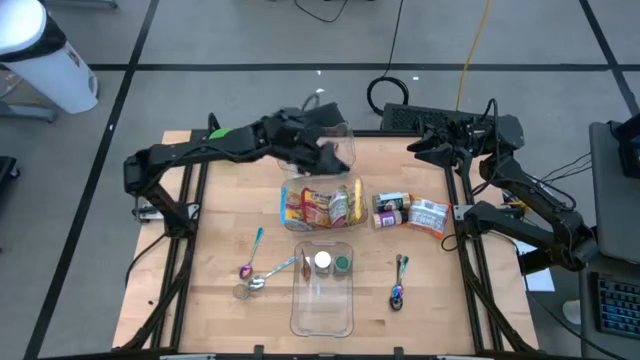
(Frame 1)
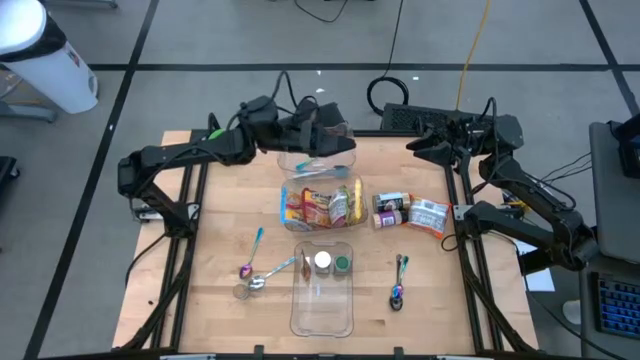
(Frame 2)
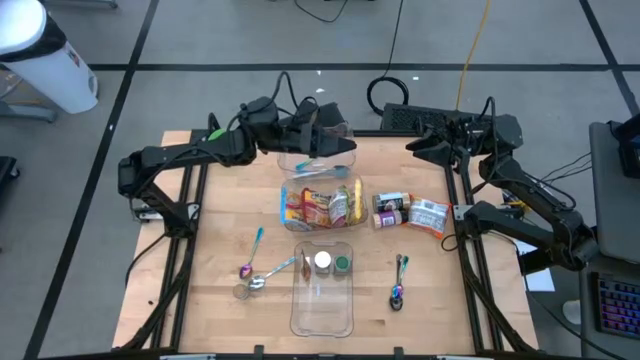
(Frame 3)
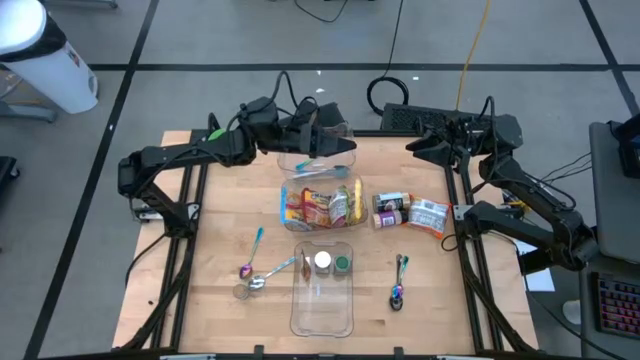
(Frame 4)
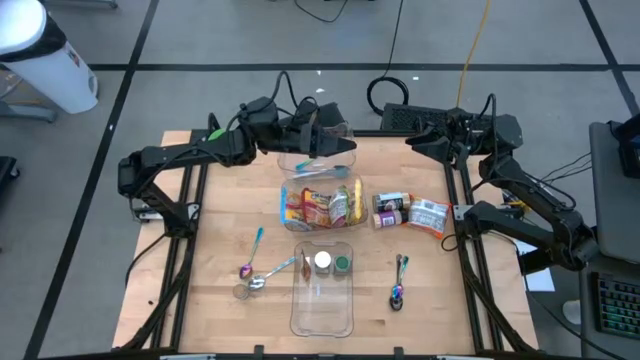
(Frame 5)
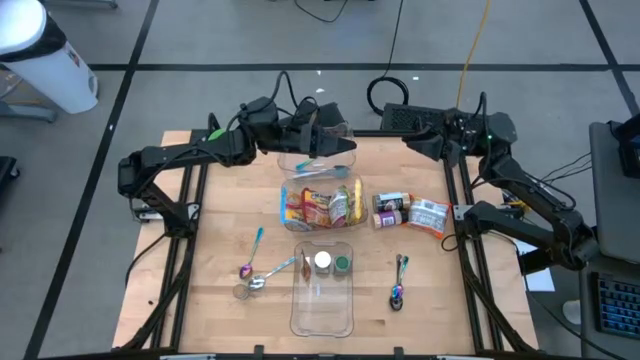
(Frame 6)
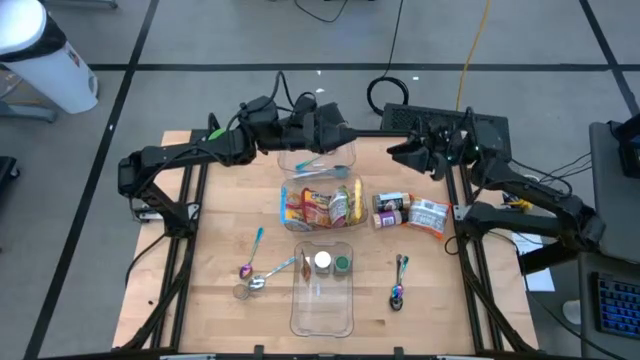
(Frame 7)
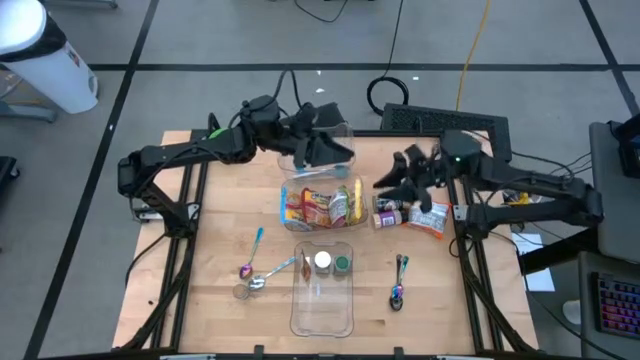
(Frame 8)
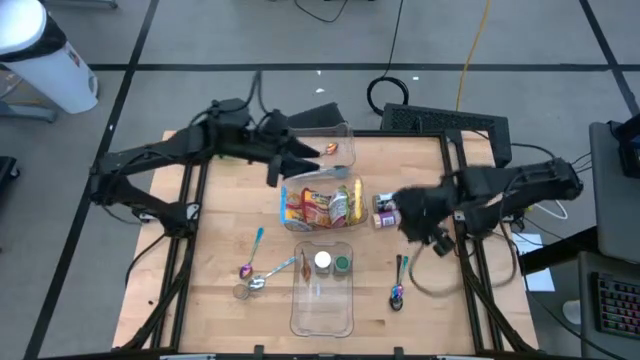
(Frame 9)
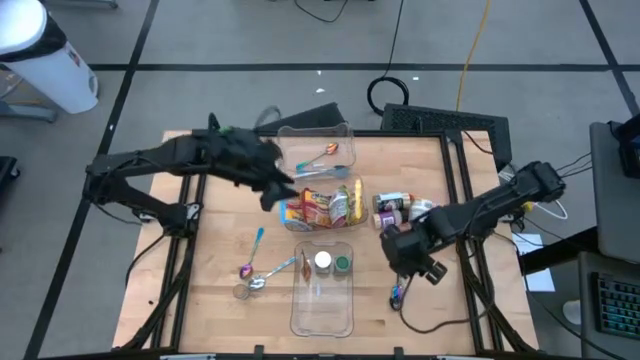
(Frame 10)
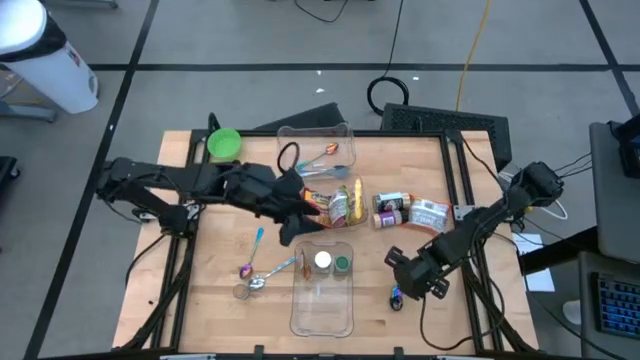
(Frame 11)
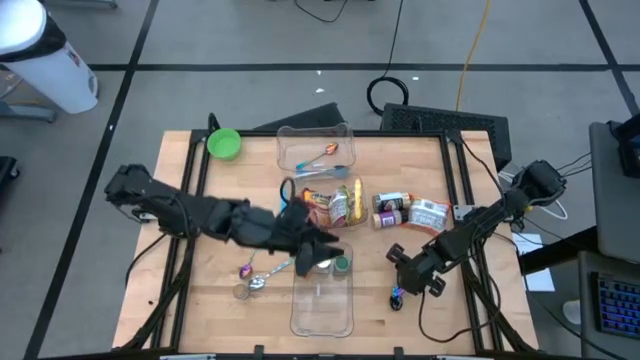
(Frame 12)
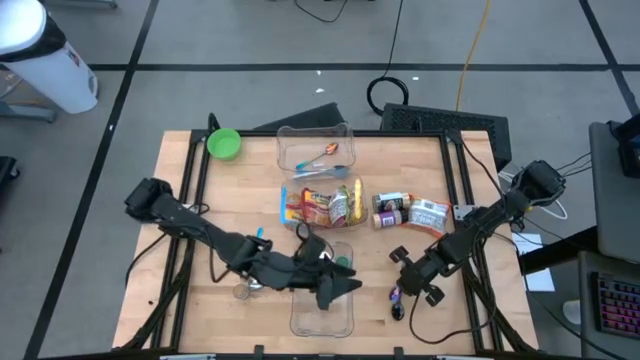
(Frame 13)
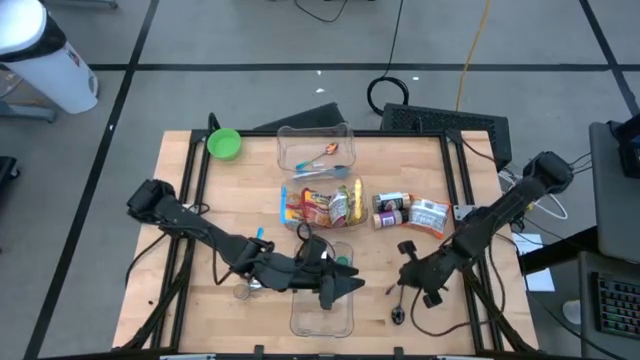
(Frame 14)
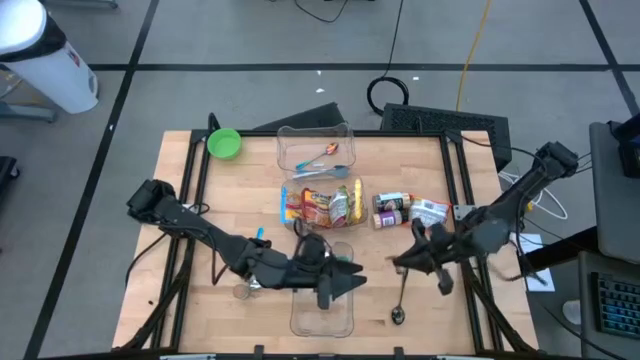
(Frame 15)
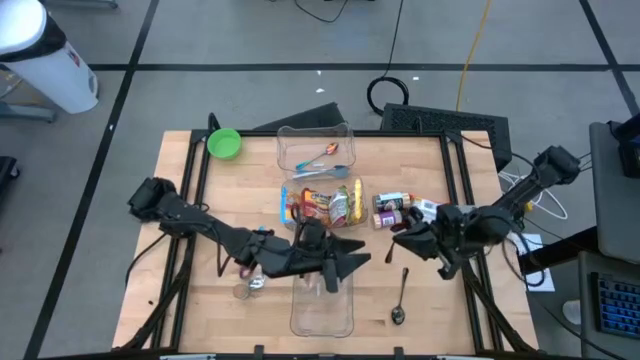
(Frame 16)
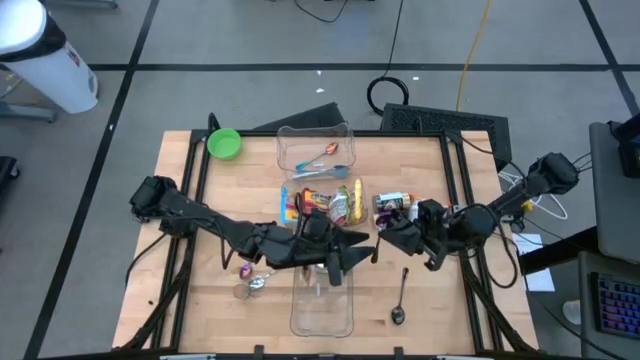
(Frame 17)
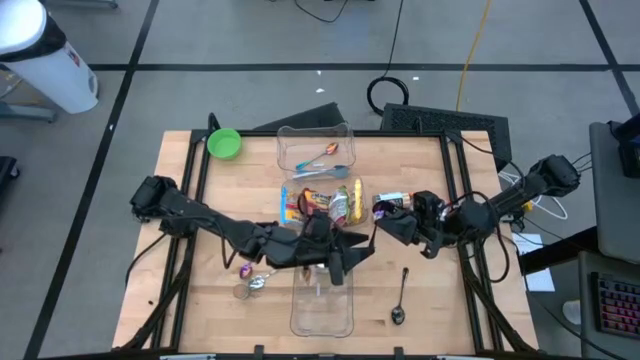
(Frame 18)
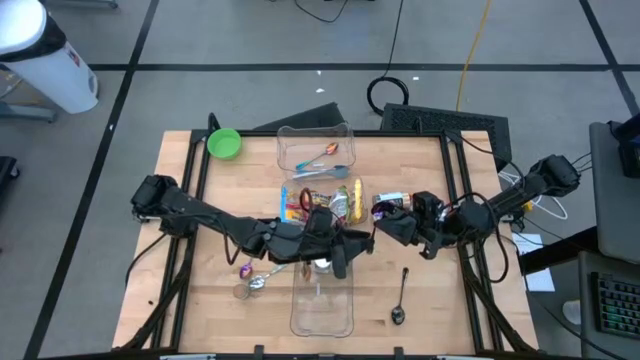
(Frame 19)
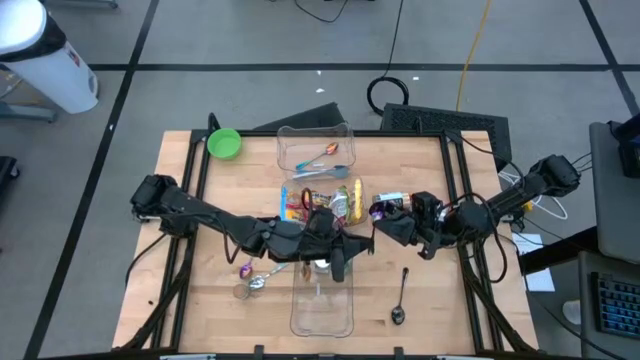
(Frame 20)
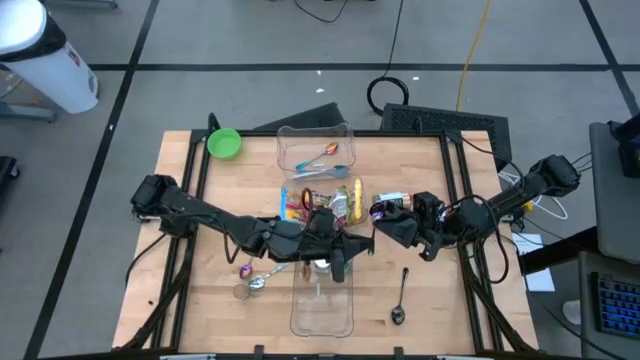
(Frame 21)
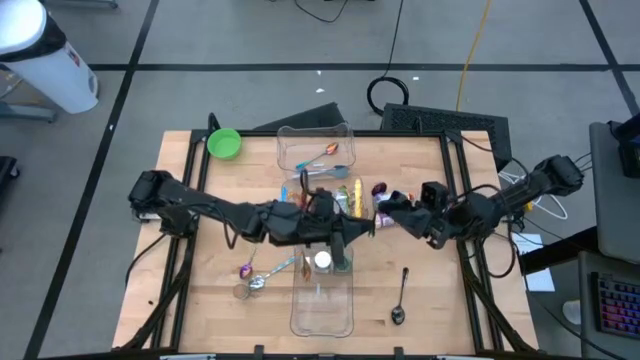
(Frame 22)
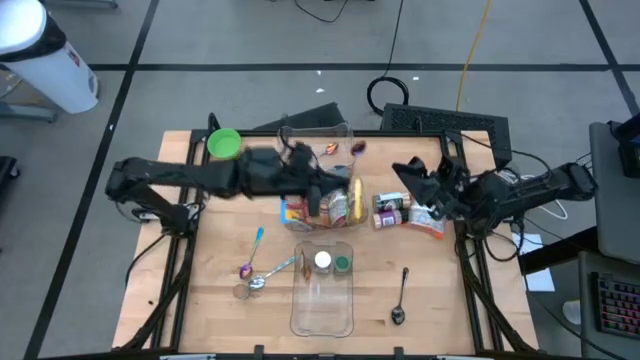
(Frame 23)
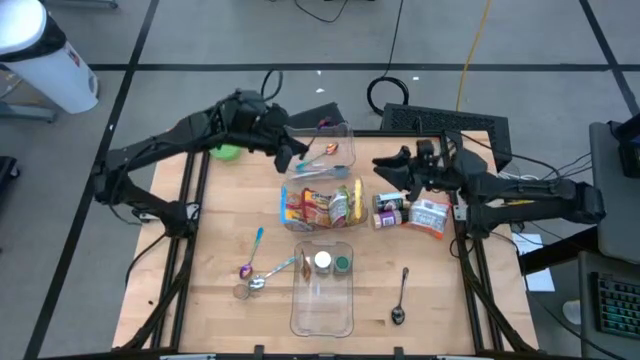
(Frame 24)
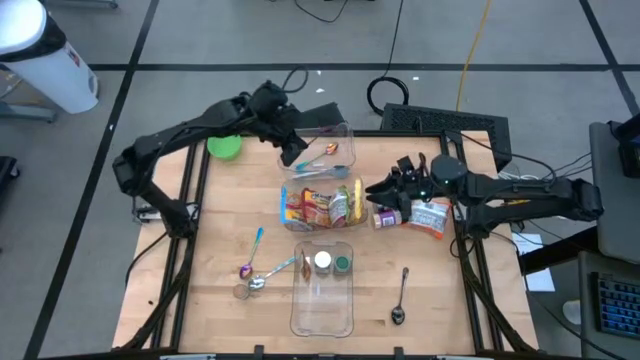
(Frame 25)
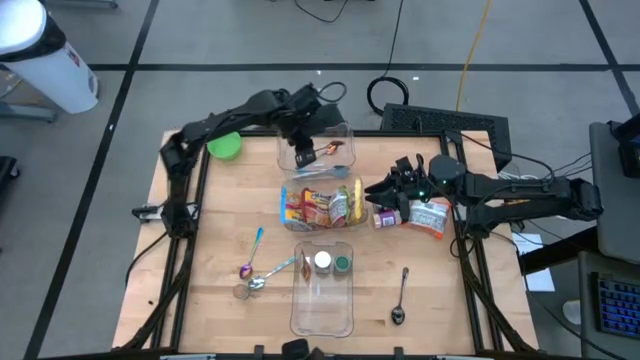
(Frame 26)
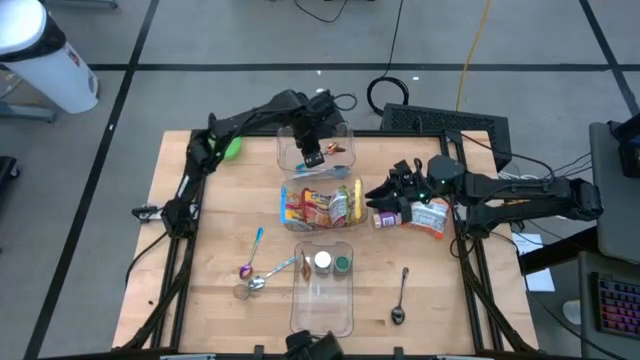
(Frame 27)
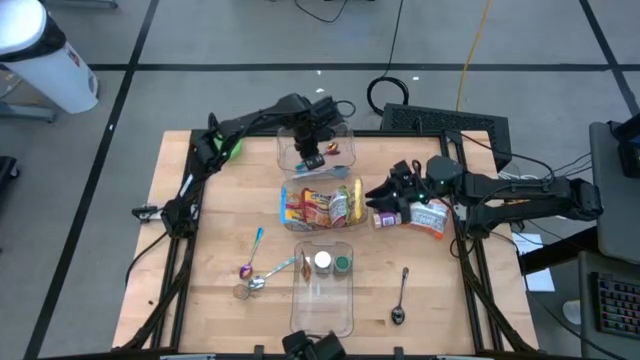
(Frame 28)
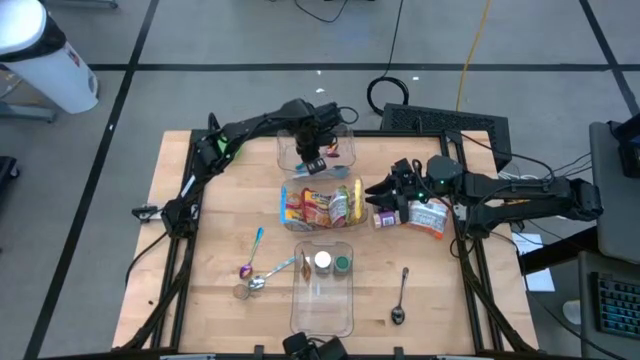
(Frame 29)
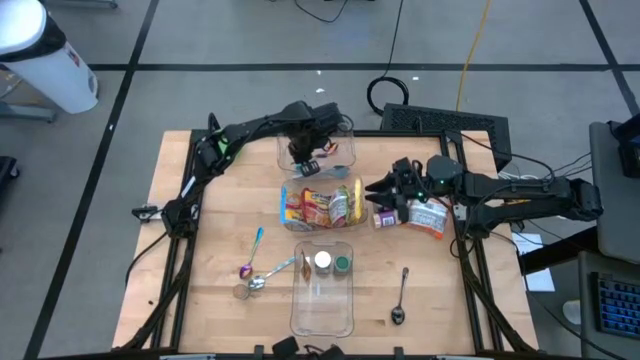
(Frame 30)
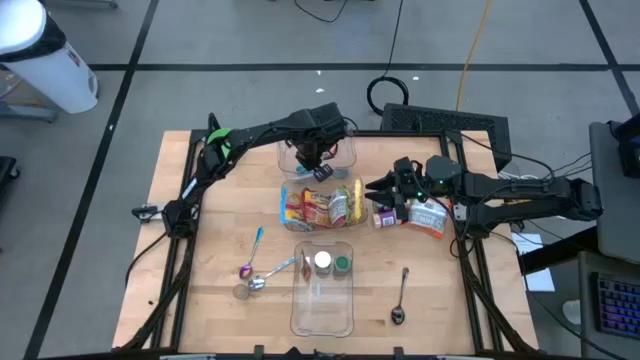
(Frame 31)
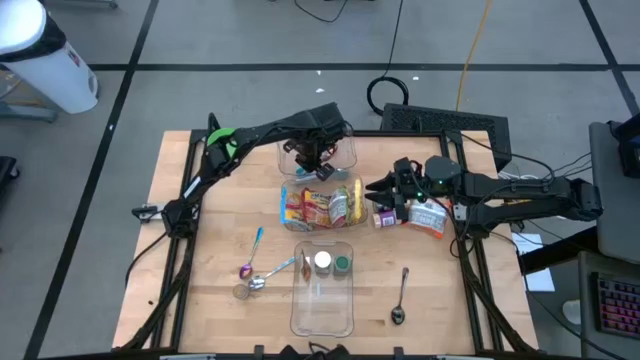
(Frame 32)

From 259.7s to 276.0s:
Task: Pick & Place Food Item
Put the right purple spoon into the top transparent bin

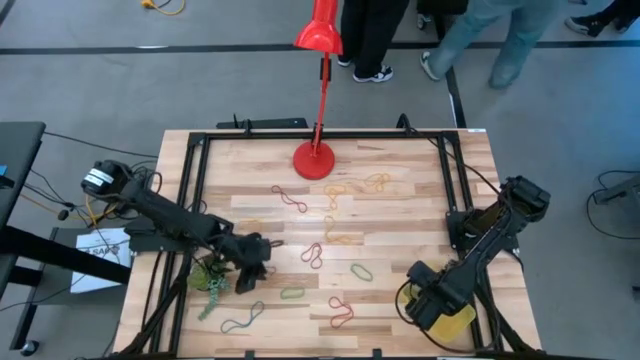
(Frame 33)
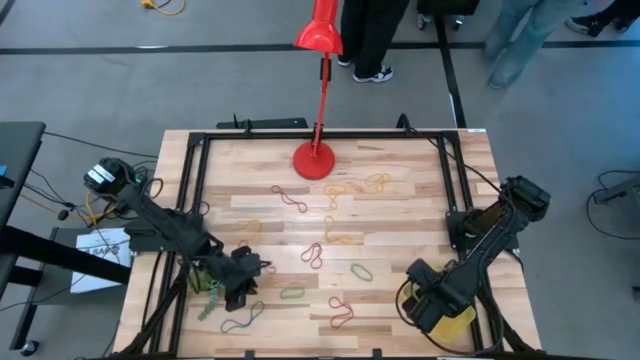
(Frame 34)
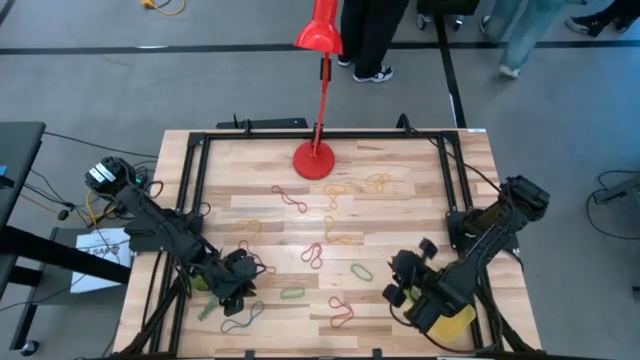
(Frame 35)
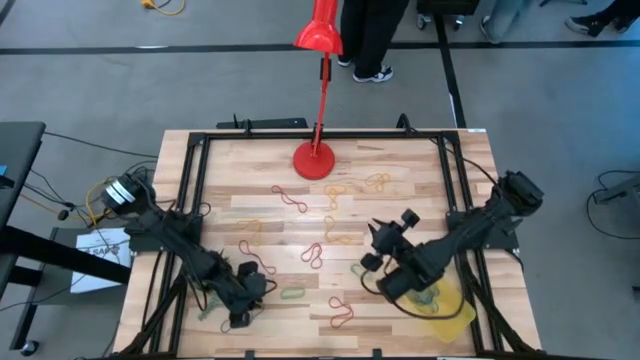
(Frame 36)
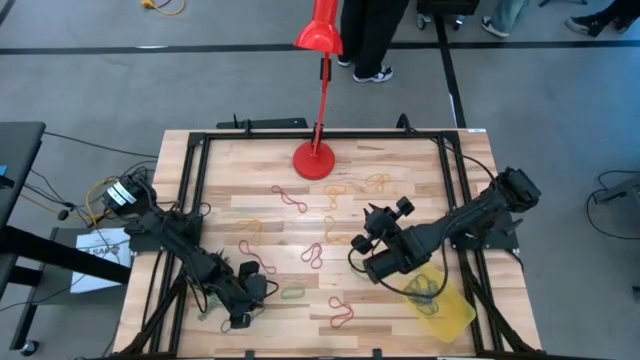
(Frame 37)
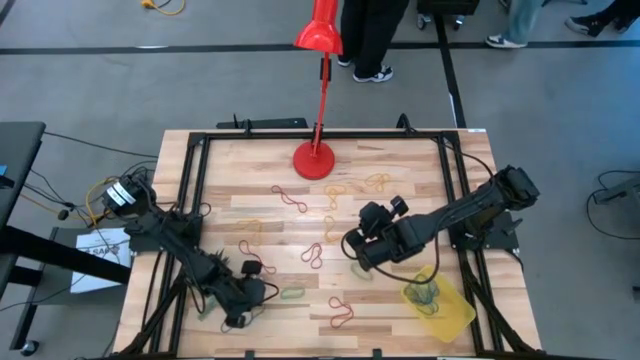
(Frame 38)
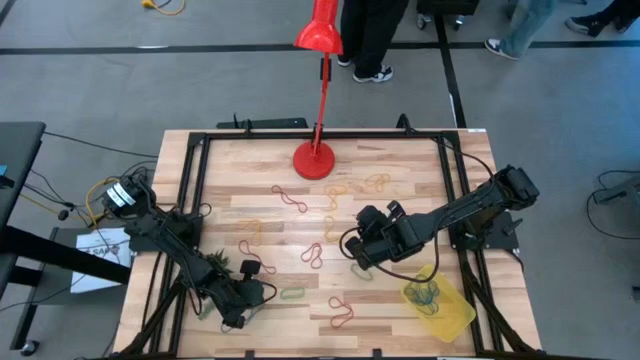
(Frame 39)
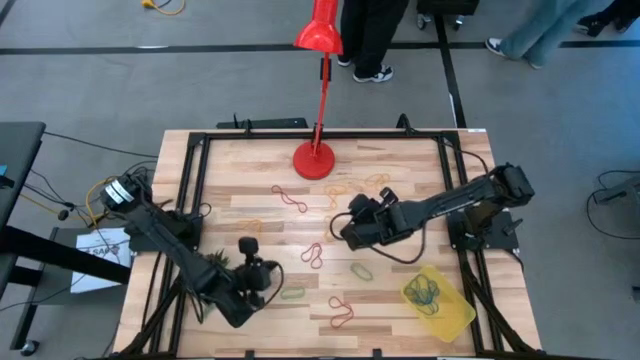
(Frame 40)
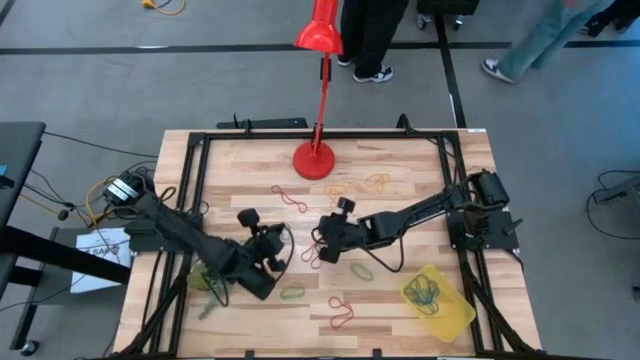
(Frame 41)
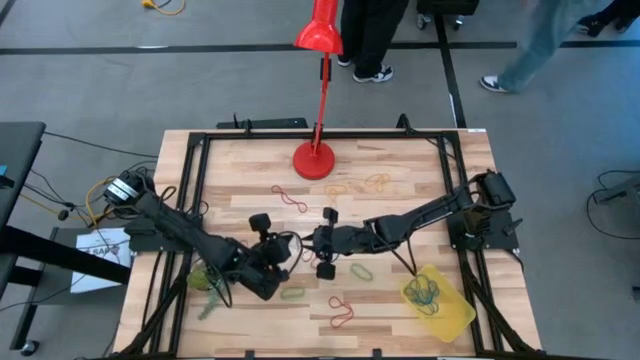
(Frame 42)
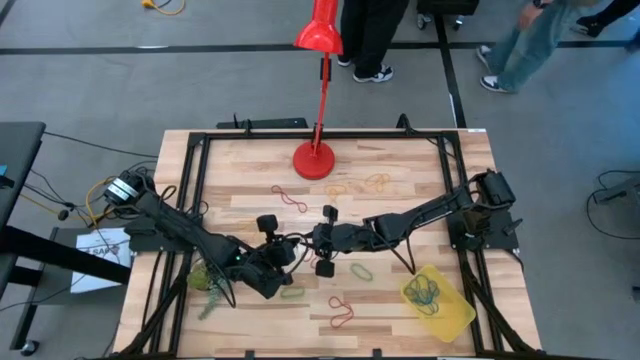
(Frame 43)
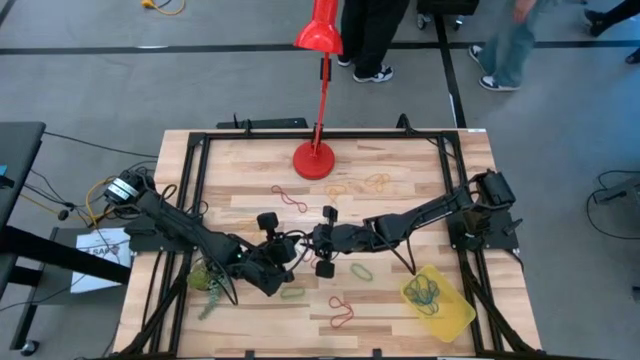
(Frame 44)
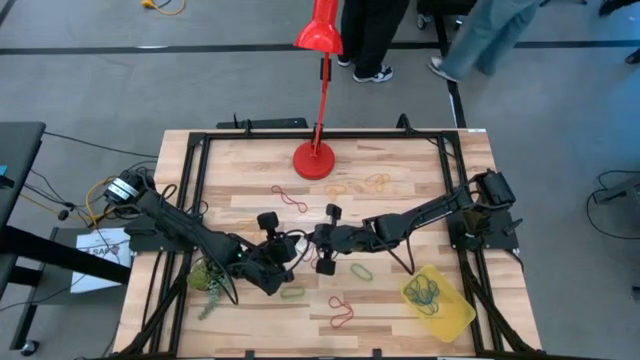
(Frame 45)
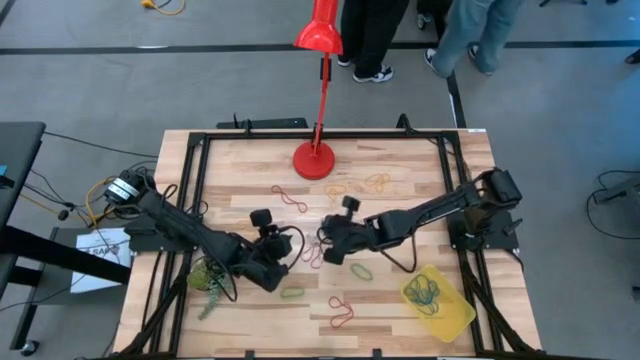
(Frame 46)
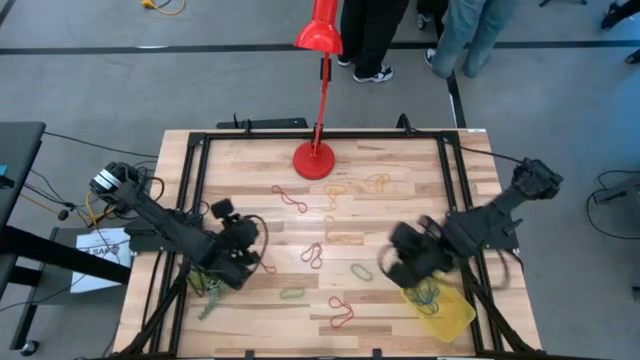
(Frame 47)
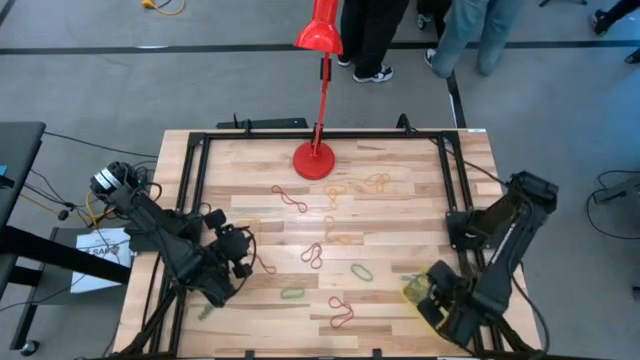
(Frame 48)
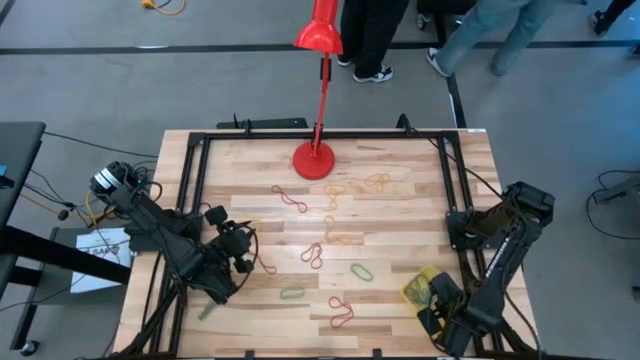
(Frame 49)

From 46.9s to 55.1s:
Task: Pick and place rubber bands into bin
Put the blue rubber band into the container
